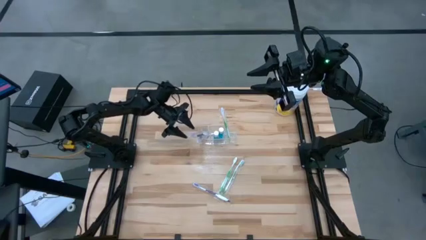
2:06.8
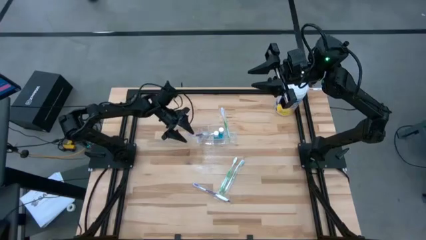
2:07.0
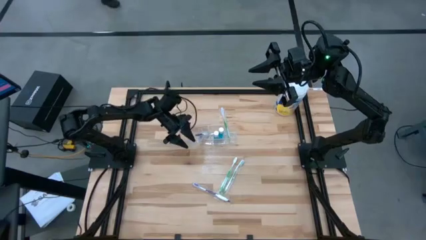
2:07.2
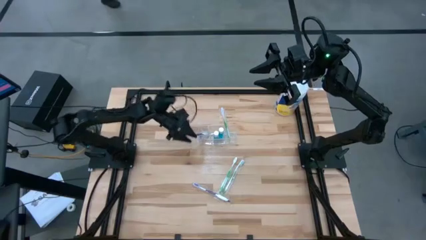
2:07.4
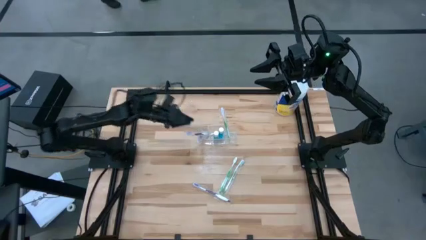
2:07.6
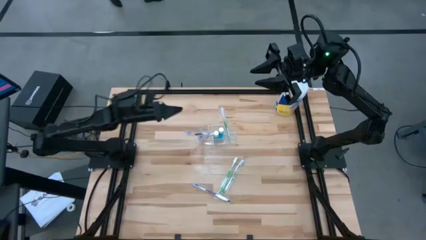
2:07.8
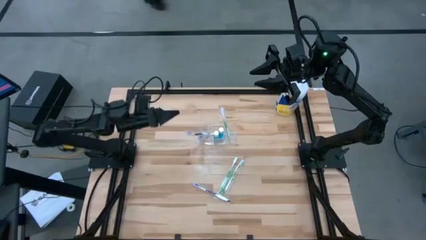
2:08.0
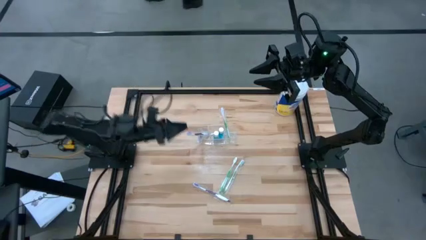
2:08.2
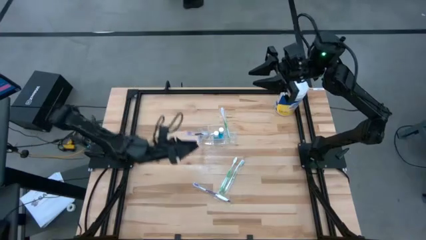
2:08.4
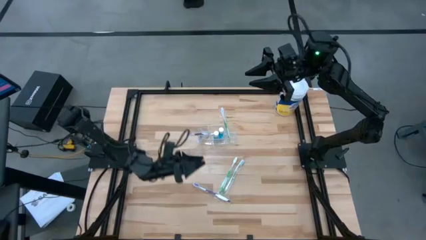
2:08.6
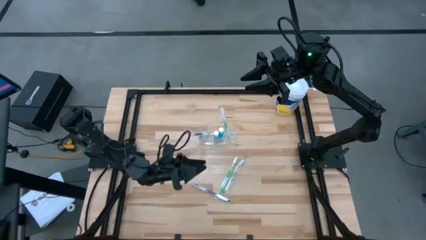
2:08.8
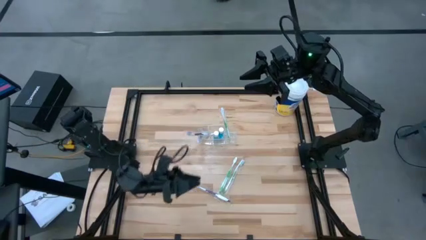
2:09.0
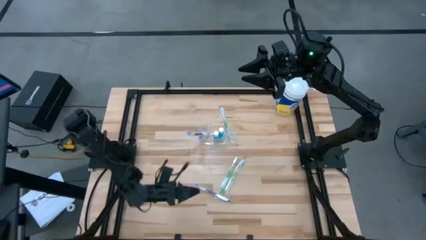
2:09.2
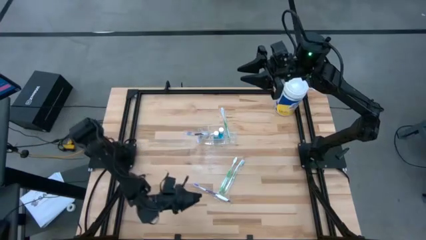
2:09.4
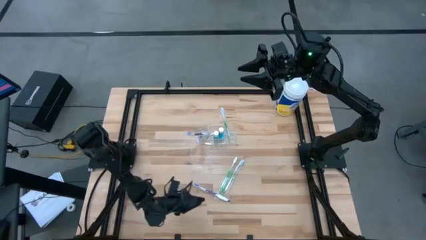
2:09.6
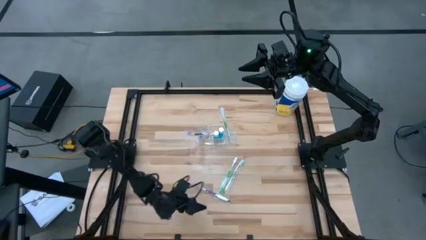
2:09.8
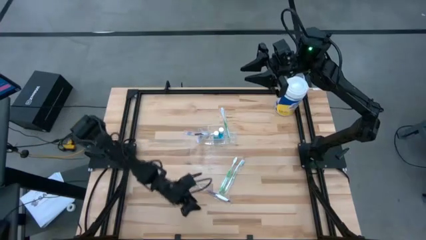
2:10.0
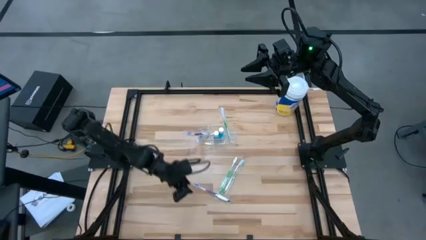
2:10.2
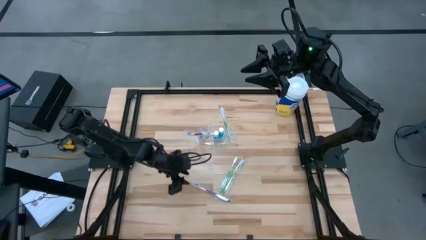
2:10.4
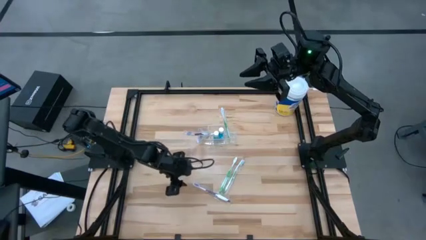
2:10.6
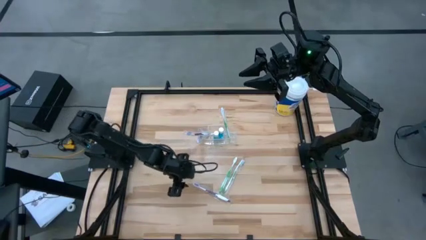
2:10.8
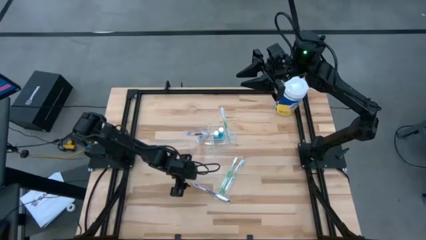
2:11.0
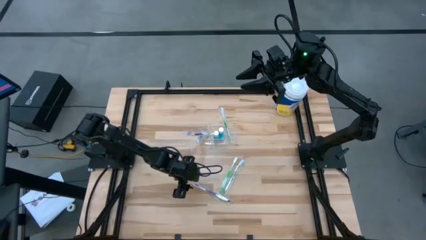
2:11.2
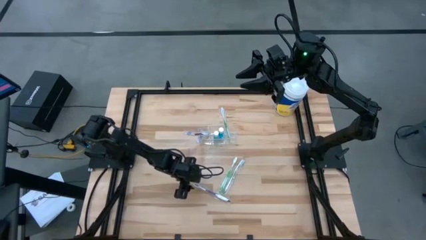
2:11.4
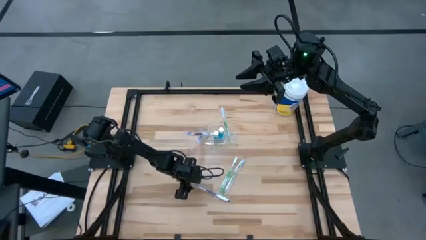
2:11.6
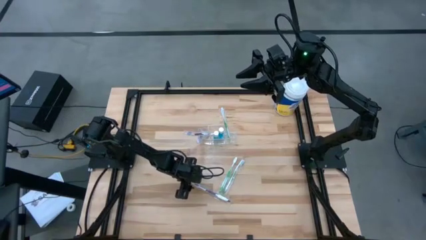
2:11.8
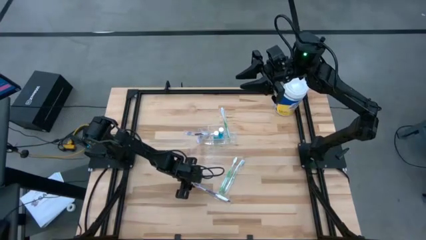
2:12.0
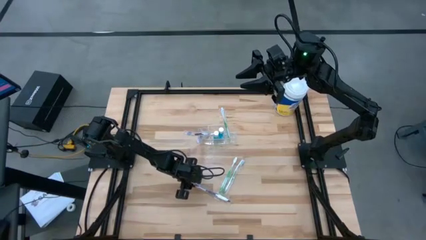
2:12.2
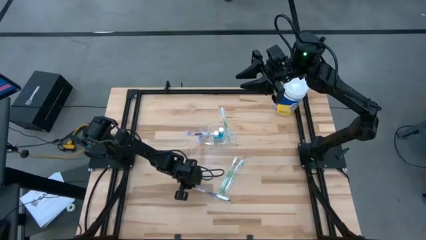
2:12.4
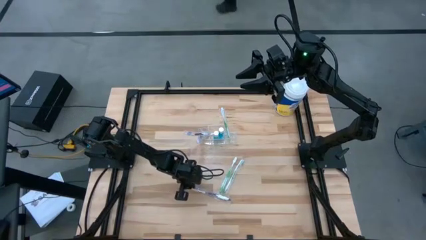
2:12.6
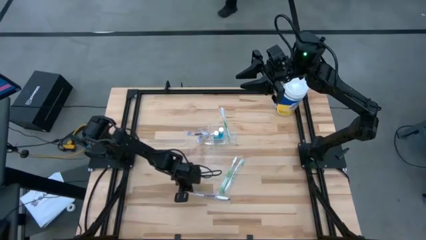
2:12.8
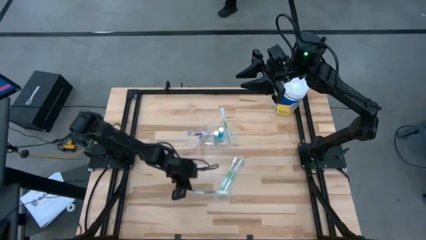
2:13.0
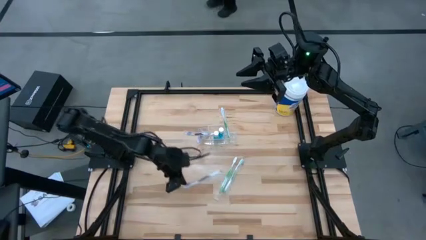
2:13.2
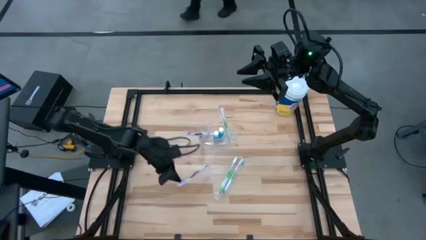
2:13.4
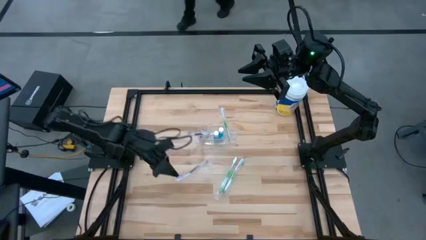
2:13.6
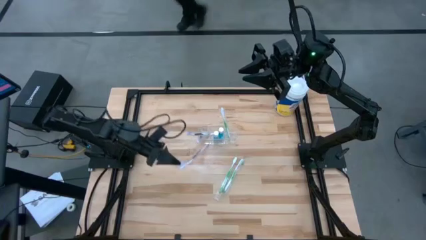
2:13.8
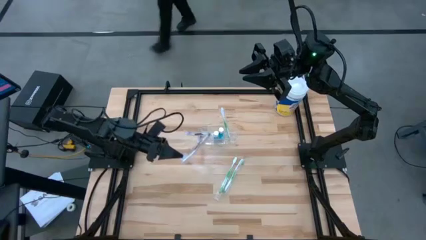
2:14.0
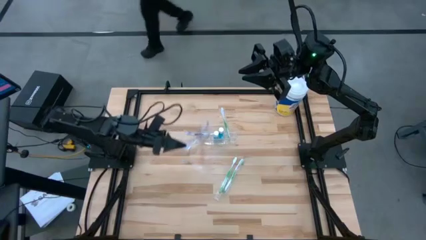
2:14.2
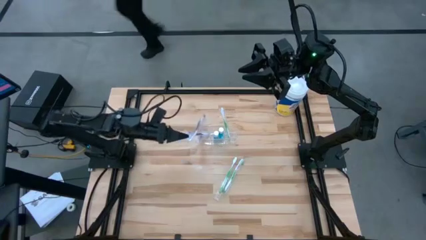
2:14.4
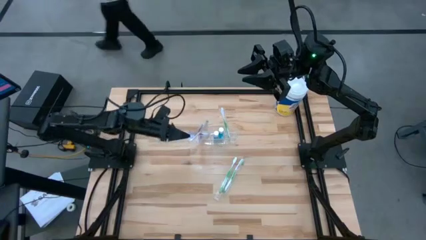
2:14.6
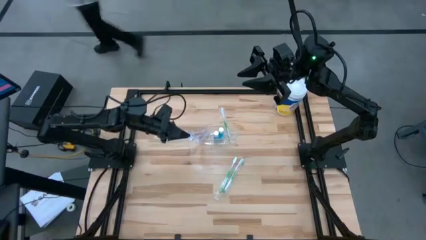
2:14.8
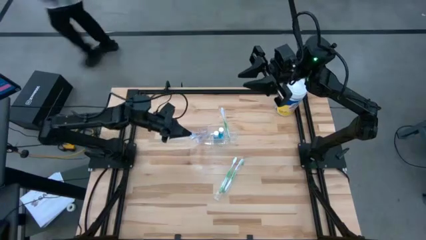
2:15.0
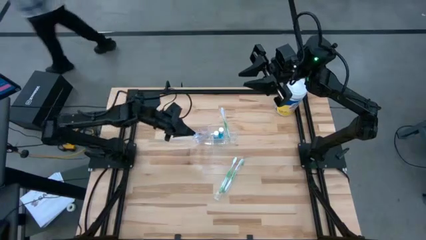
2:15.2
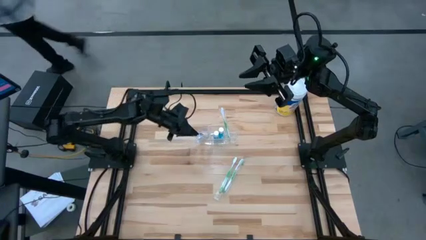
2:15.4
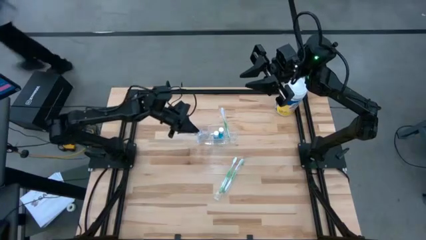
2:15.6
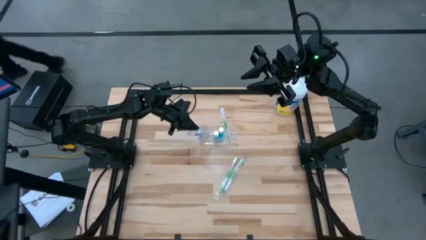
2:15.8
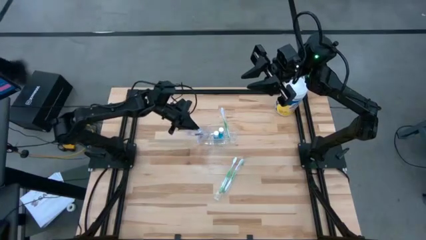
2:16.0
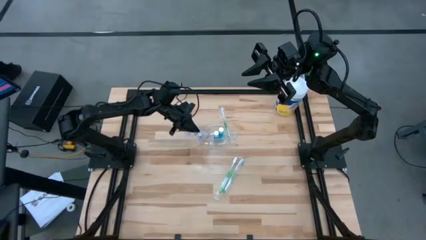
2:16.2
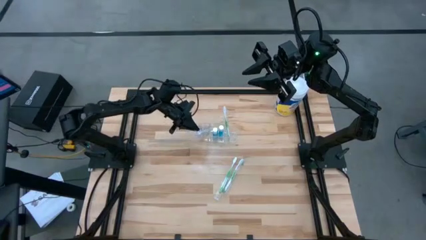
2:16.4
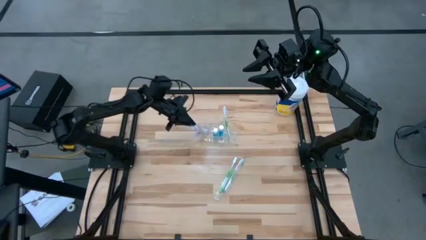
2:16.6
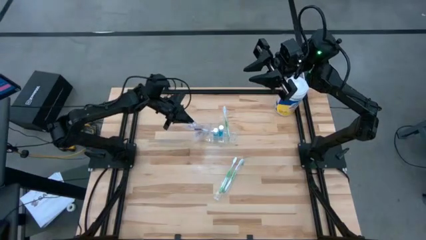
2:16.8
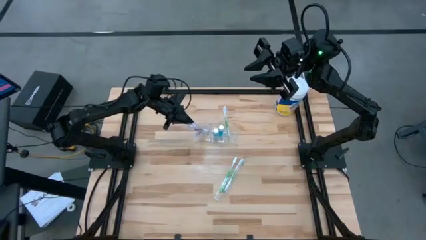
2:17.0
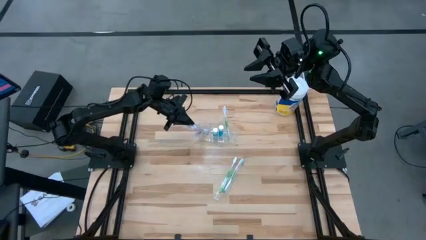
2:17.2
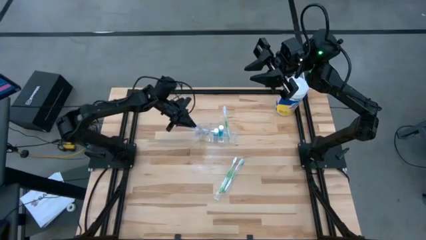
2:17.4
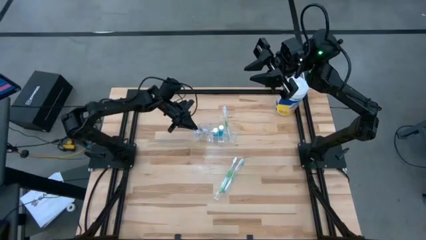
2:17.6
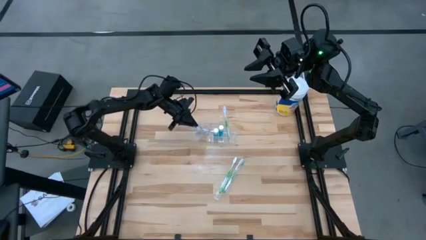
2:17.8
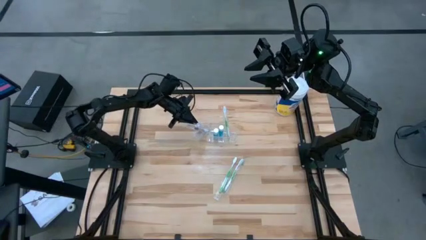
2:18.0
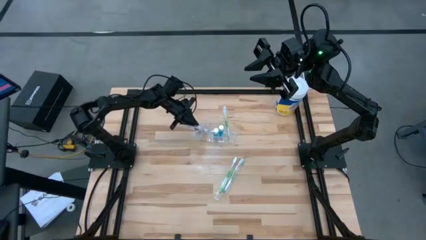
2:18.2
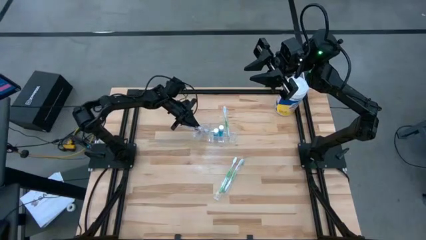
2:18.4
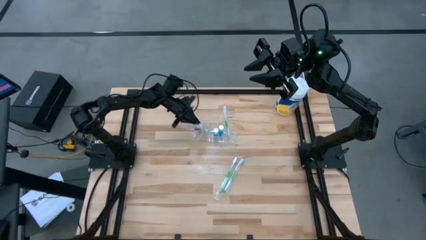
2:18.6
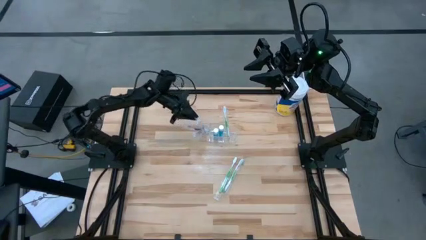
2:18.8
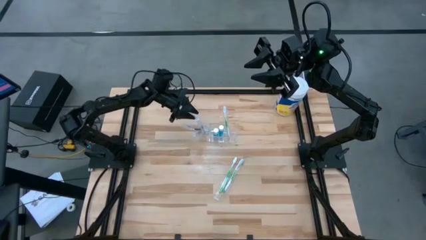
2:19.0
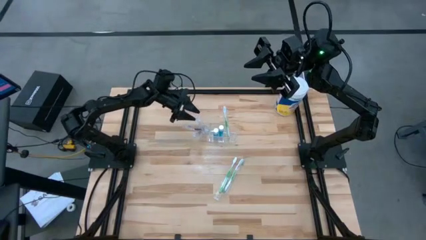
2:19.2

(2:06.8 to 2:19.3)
Task: Pick & Place toothbrushing station
Put the purple toothbrush into the transparent organizer

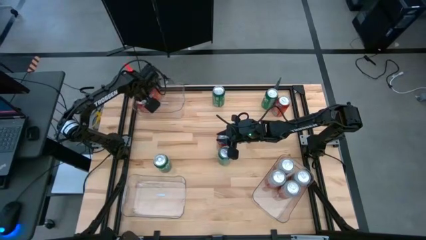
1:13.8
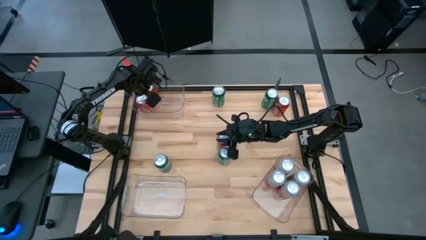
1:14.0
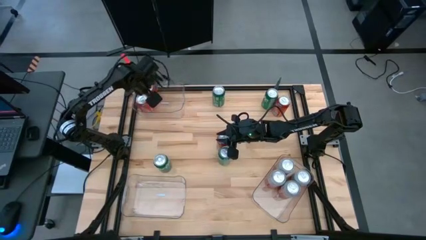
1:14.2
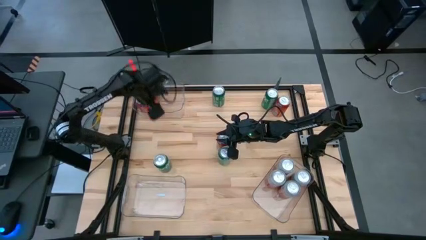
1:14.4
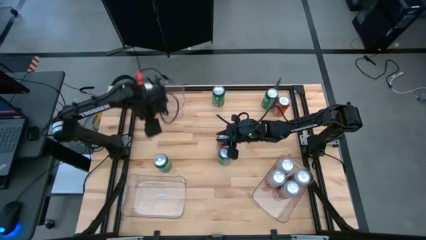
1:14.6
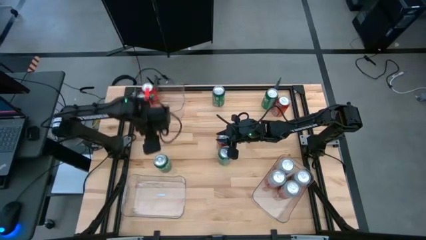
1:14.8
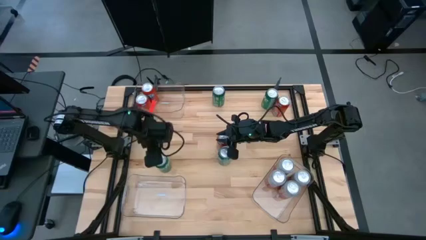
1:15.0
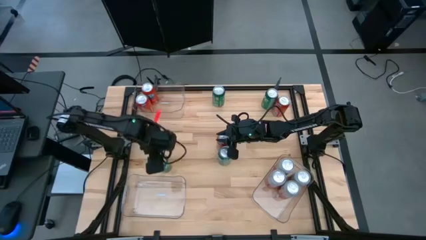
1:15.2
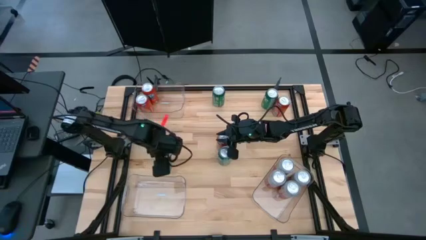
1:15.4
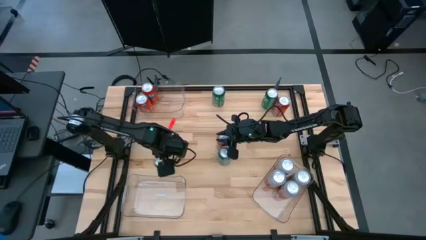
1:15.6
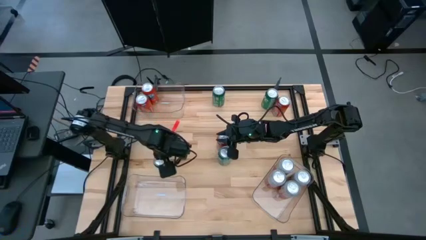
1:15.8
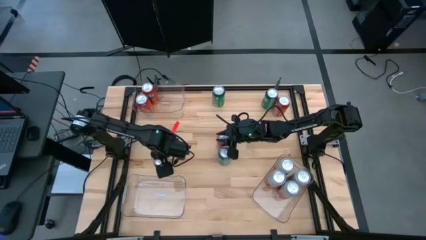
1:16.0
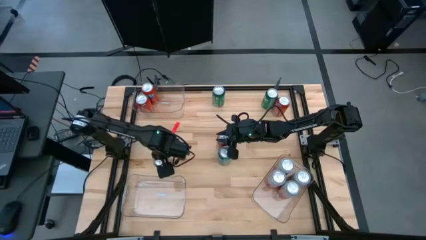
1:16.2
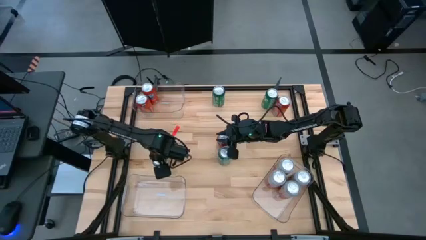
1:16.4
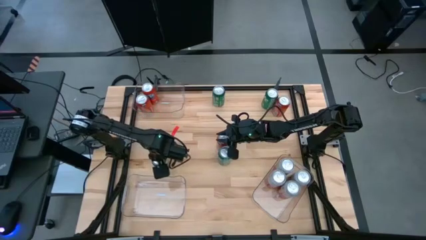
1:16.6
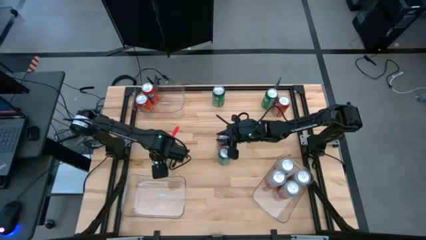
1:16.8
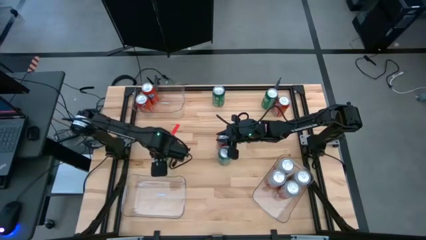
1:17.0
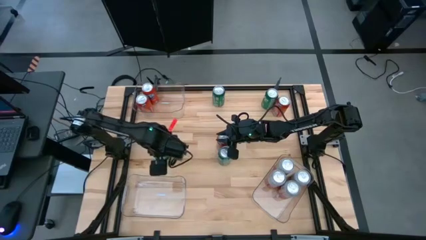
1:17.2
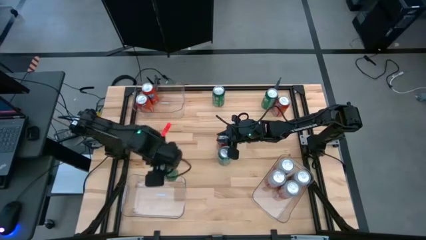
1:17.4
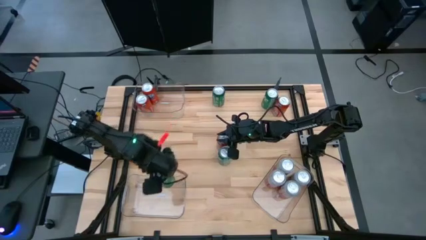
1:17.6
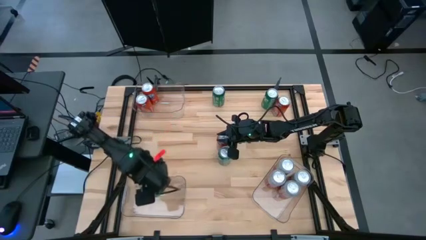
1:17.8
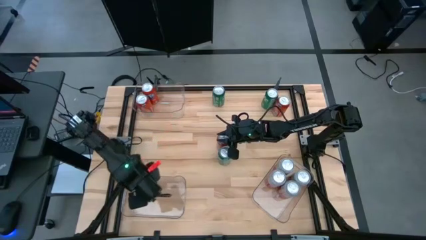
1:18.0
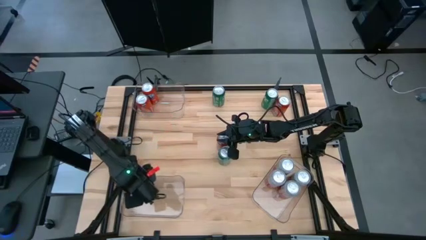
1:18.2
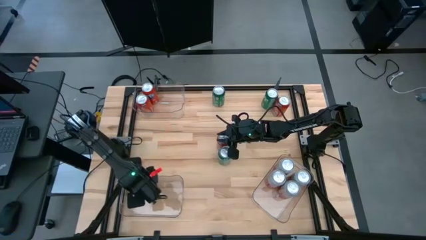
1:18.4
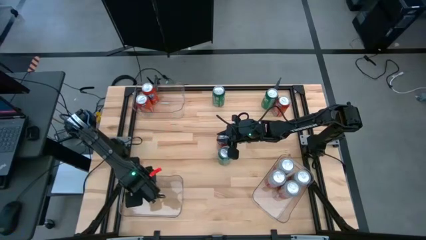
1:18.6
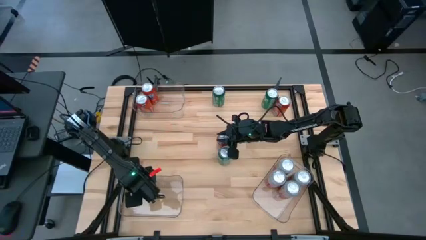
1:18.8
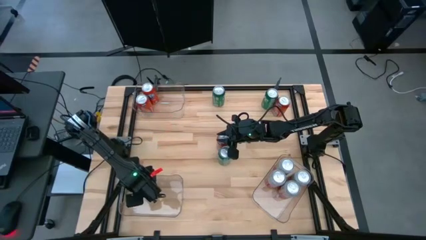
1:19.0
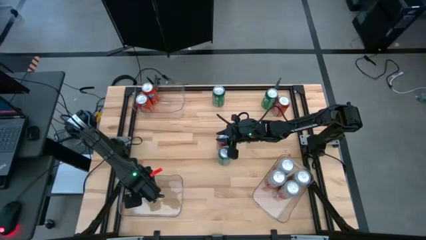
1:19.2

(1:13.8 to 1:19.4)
Task: Sort soda cans
Put the green soda can into the bottom left transparent bin
